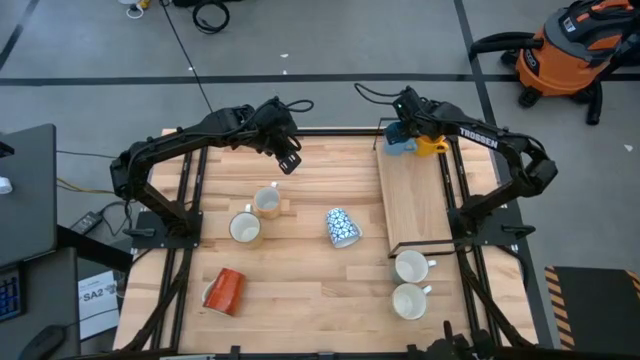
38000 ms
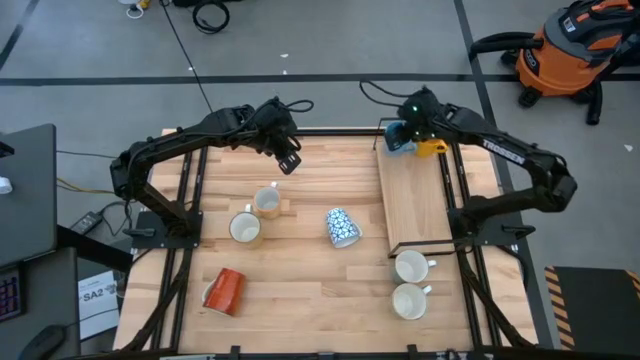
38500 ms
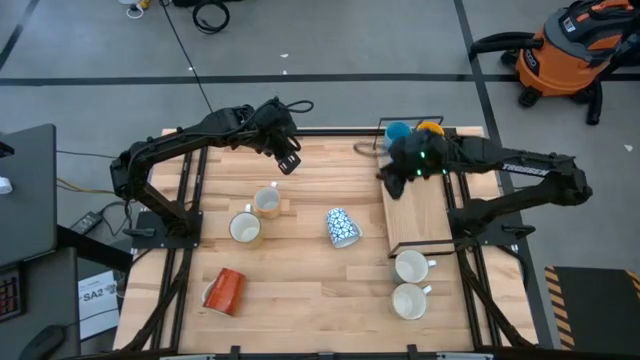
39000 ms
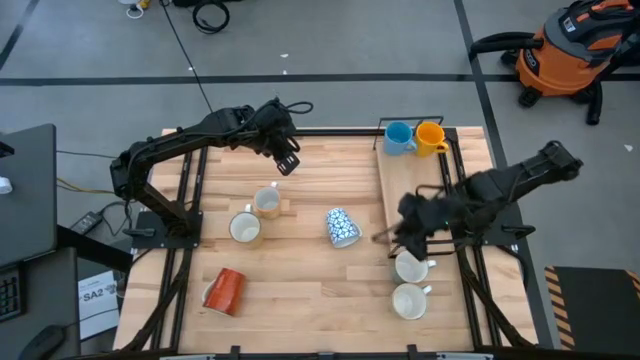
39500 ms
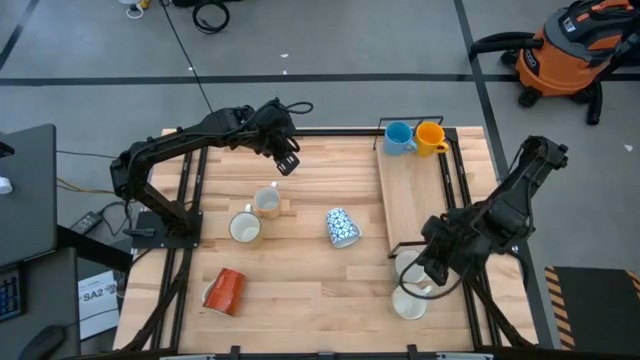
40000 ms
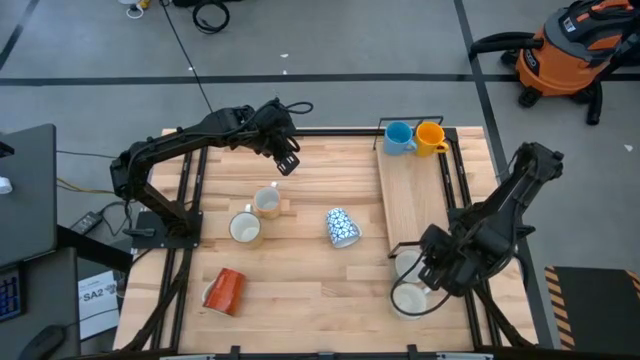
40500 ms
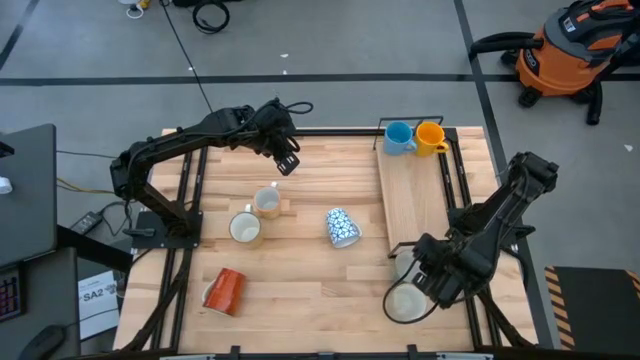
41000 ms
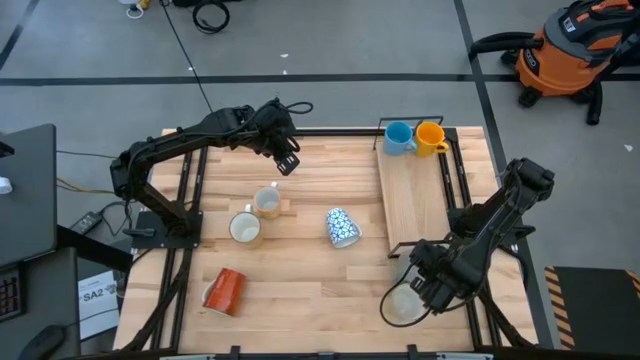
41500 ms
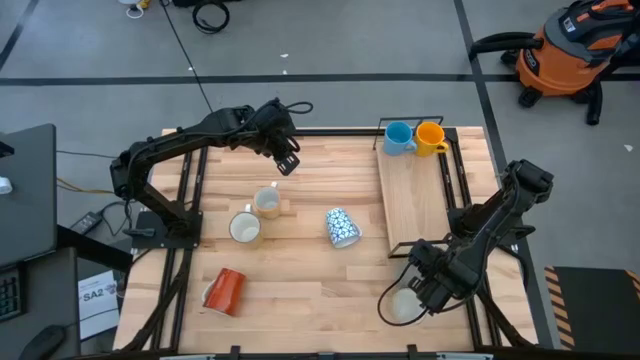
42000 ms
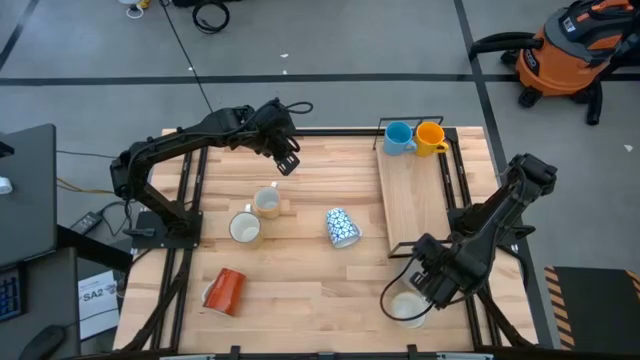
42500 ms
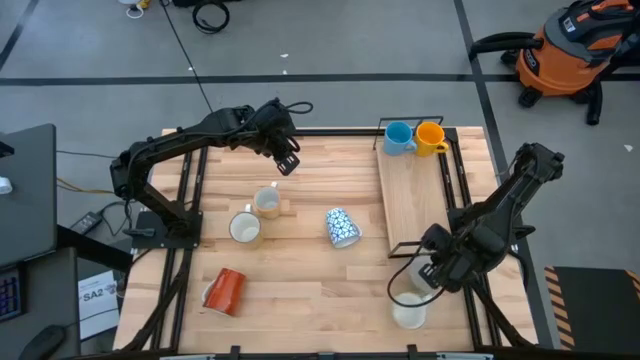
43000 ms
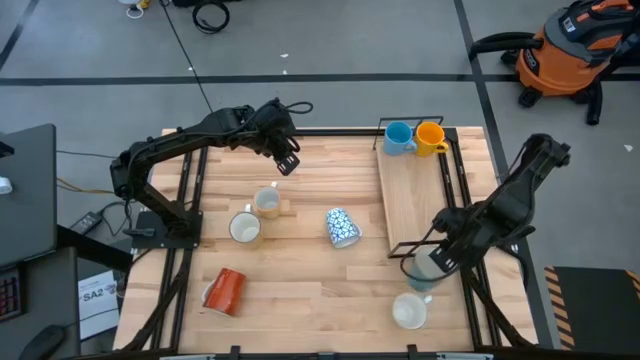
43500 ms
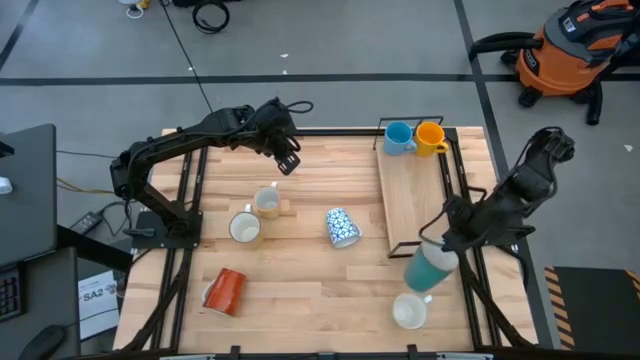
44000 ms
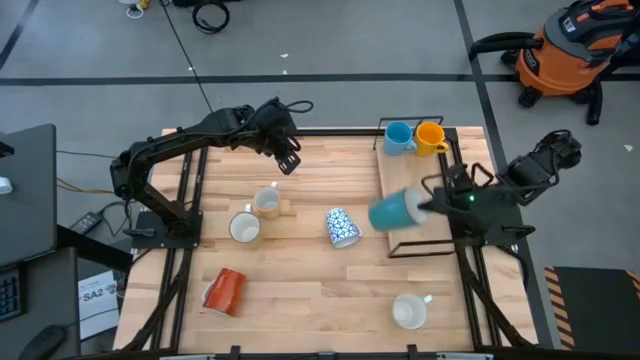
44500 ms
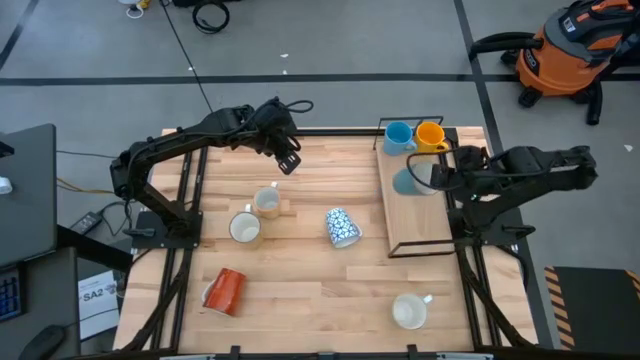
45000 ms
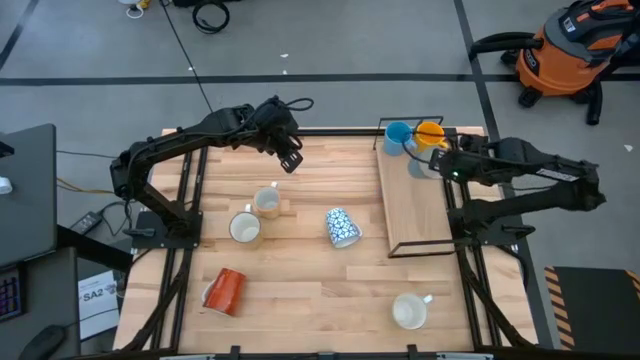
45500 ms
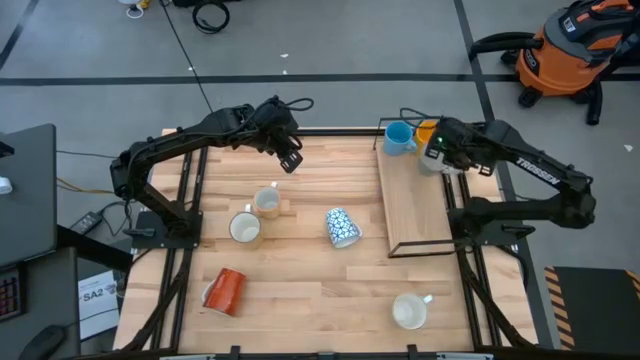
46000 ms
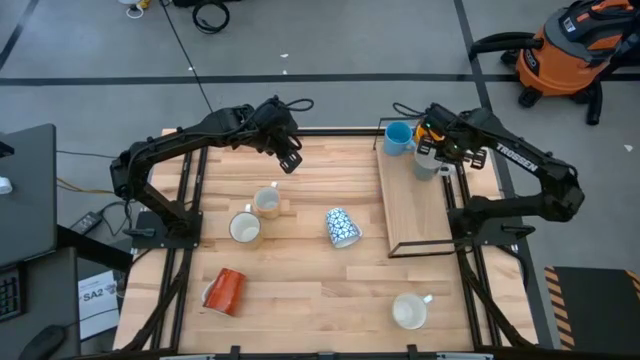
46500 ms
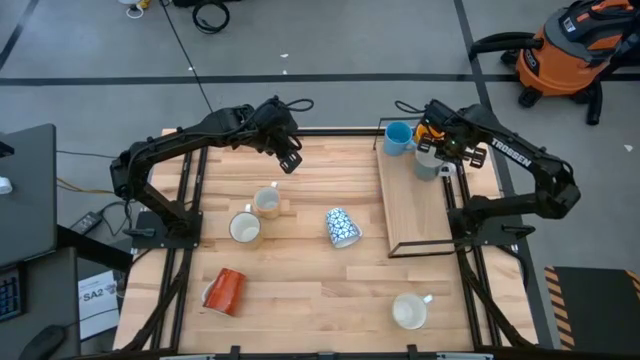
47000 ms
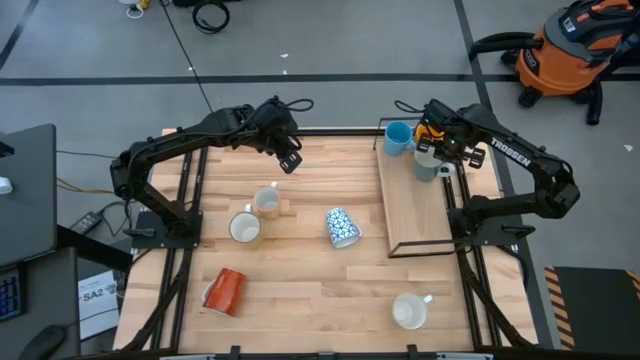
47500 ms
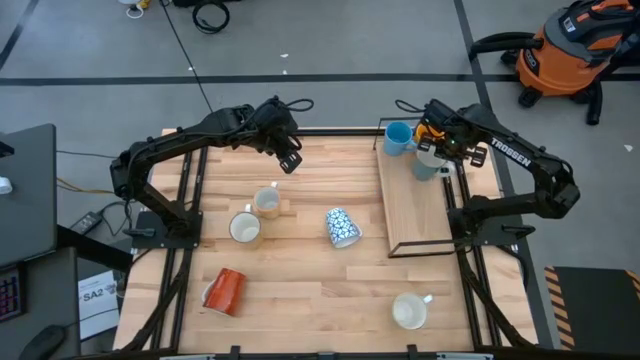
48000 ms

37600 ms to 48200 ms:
Task: Place coffee mugs
Put the green mug on the shelf

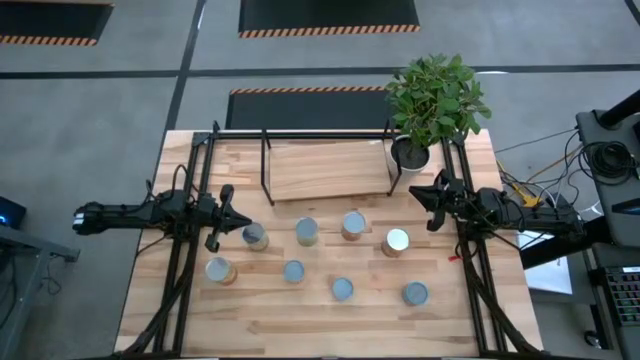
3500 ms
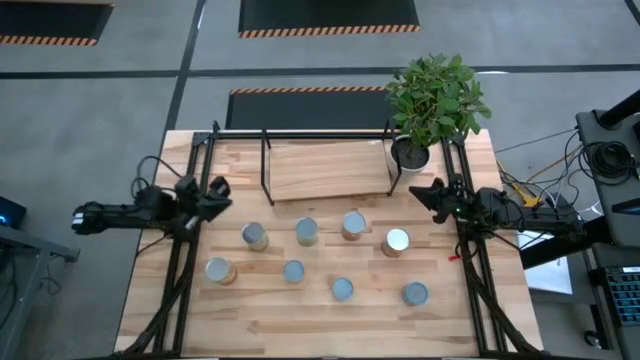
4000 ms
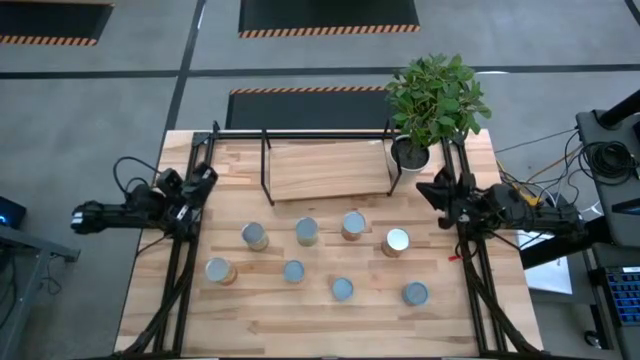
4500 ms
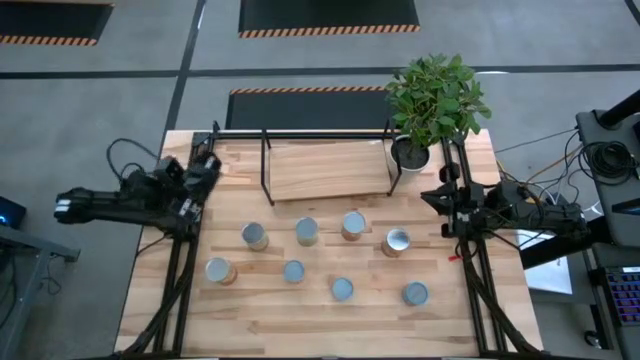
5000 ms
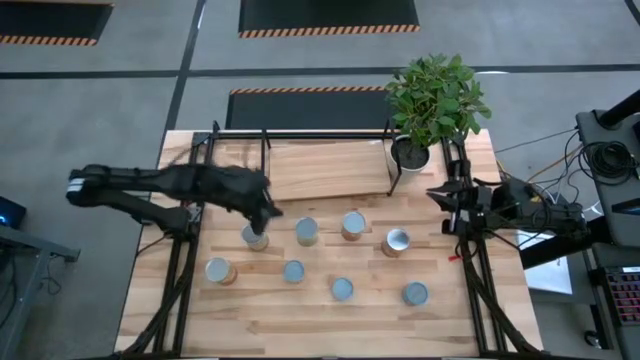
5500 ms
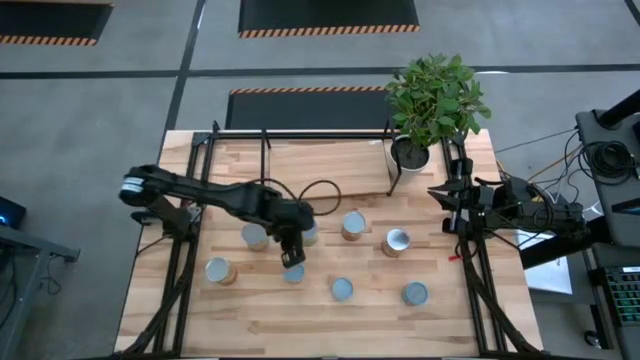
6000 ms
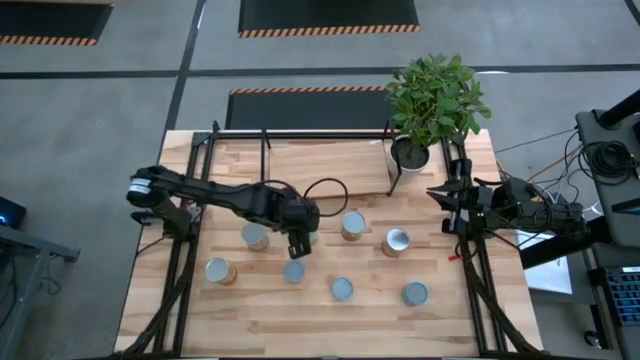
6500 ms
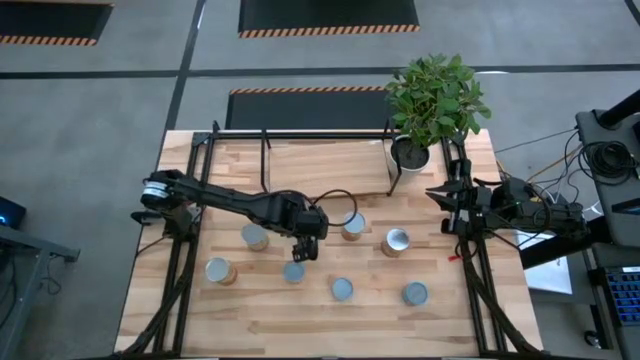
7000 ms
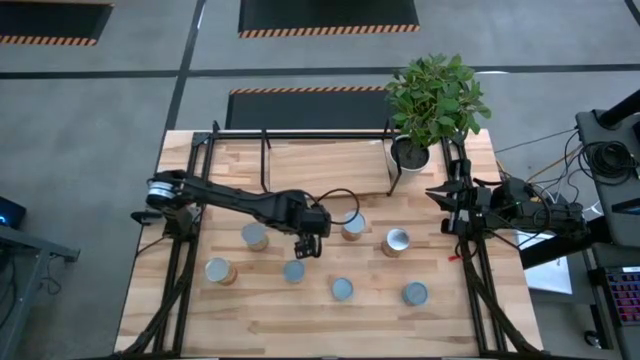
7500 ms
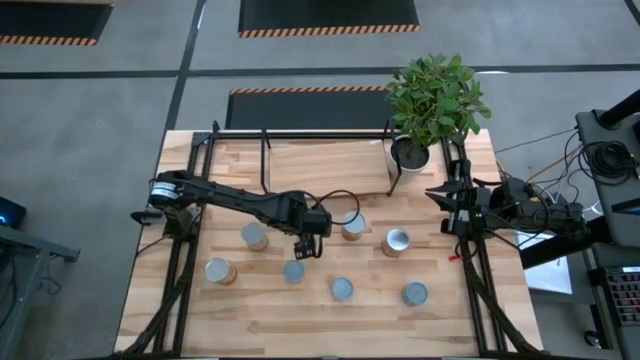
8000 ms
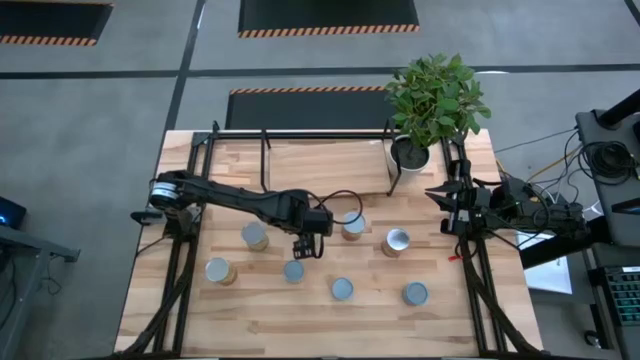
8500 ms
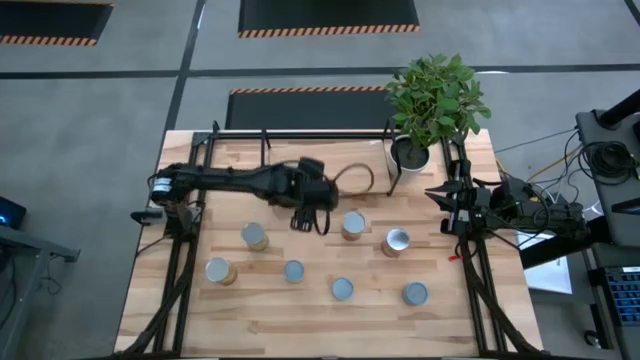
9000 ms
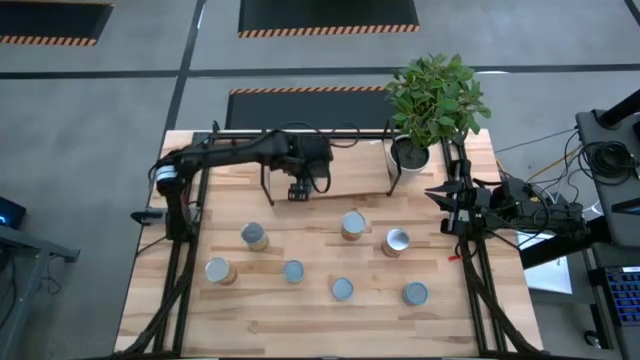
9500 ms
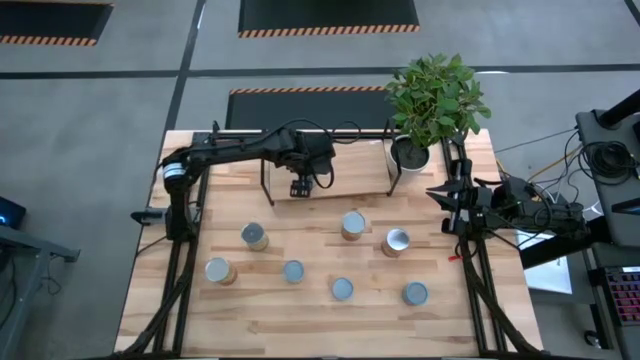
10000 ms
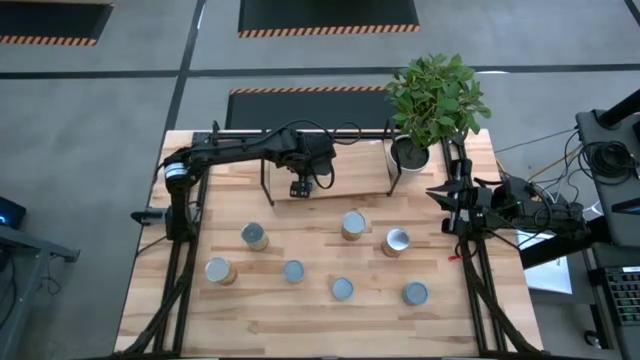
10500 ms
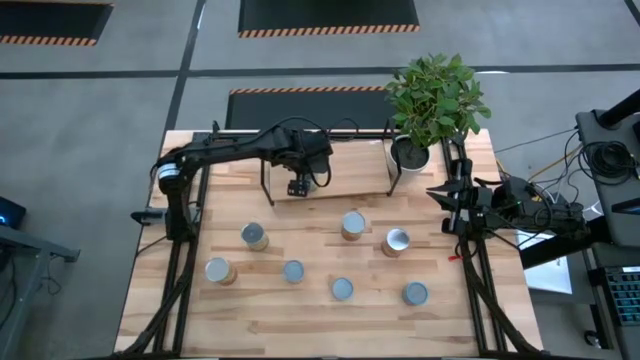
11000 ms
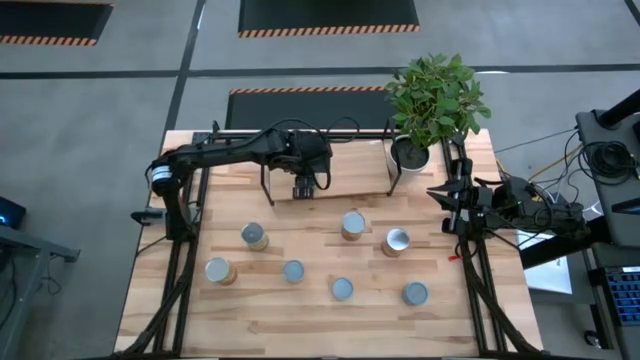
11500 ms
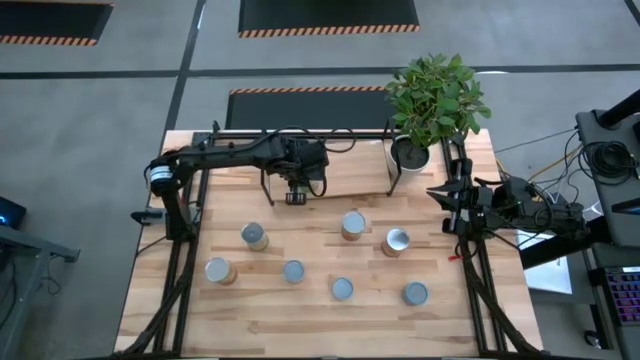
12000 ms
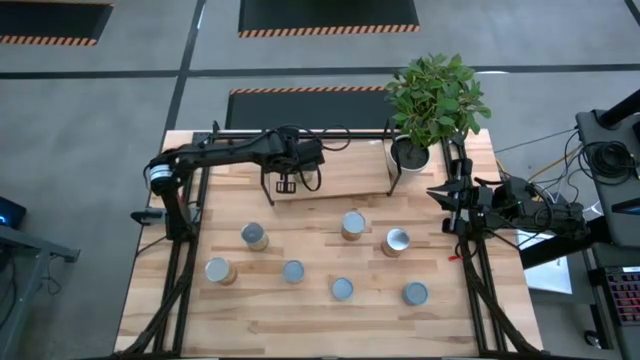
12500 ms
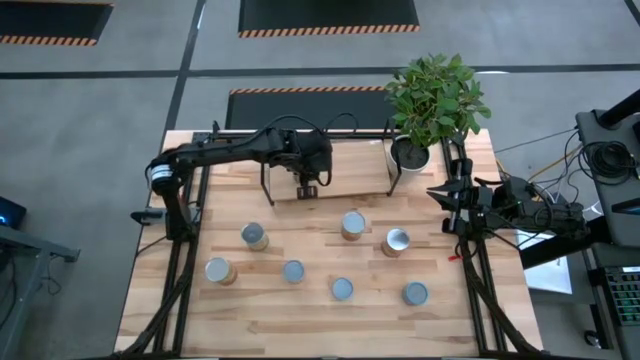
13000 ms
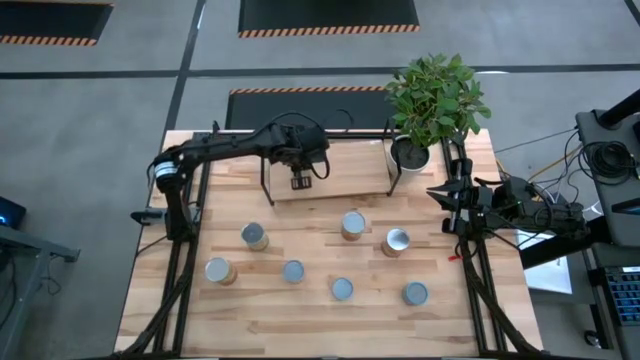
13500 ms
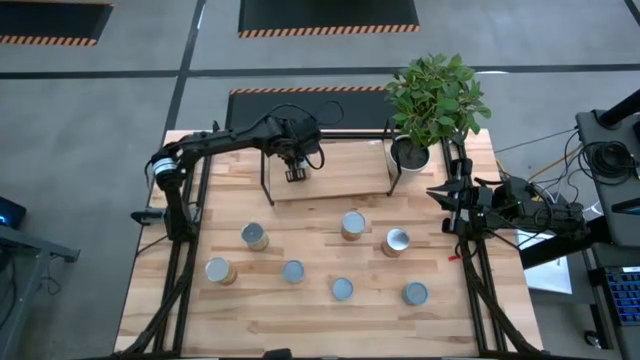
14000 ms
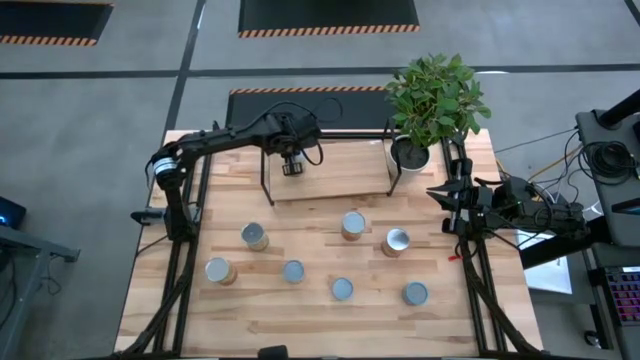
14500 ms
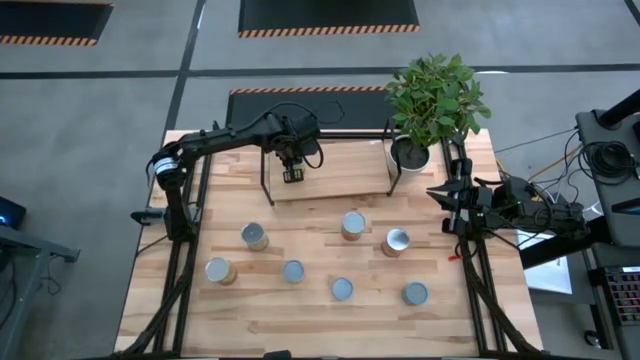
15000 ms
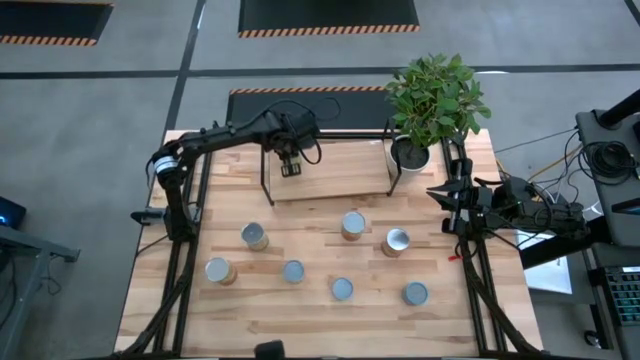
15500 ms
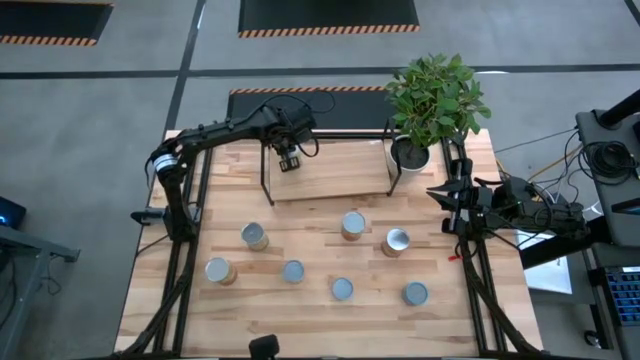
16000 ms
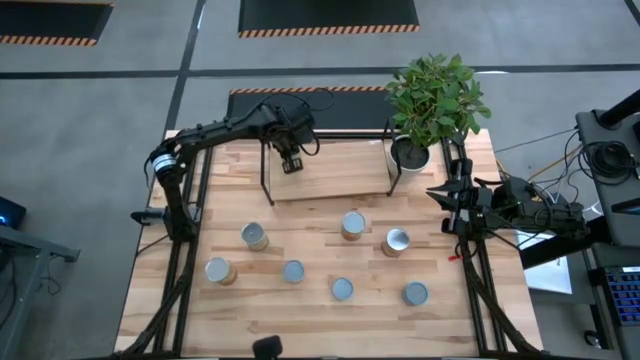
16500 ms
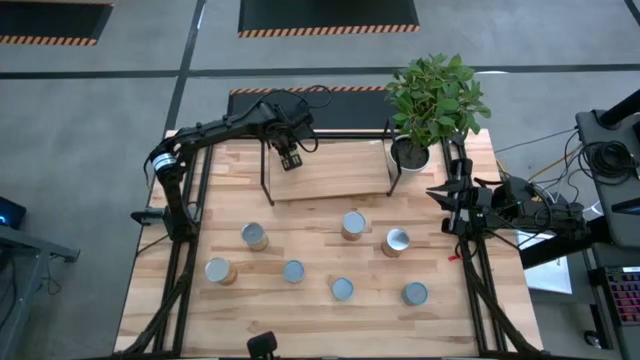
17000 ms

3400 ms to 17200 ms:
Task: Pick and place cans onto a shelf
Put the canned pears on the shelf
